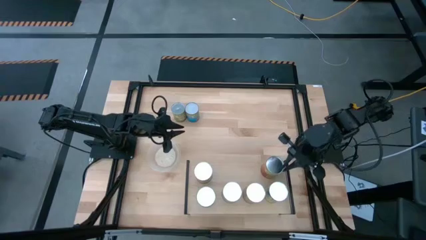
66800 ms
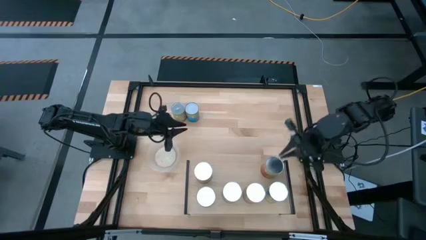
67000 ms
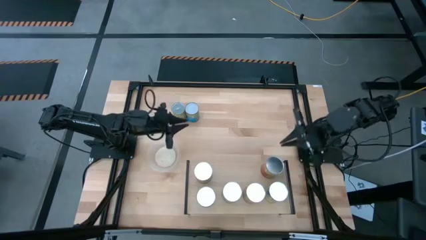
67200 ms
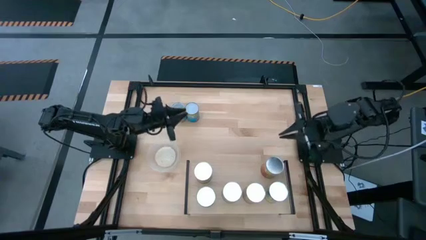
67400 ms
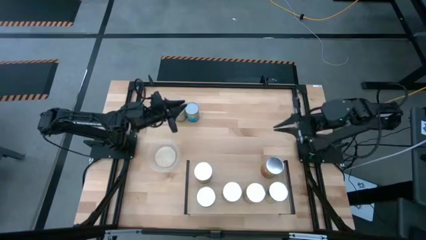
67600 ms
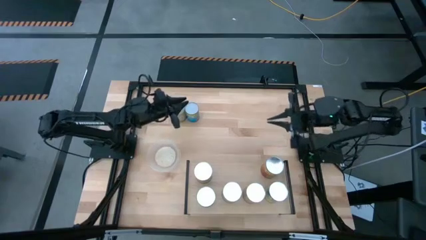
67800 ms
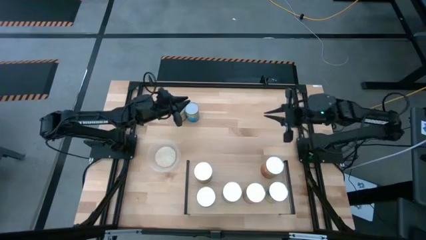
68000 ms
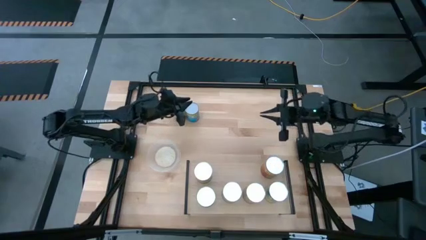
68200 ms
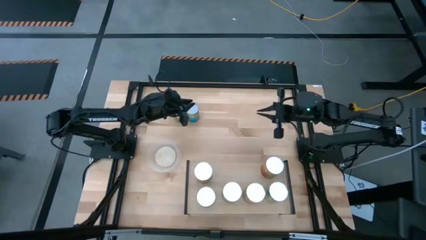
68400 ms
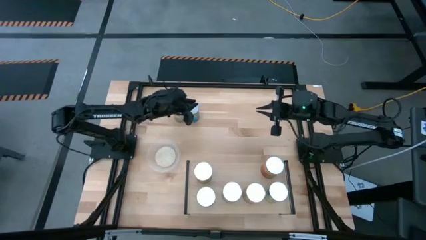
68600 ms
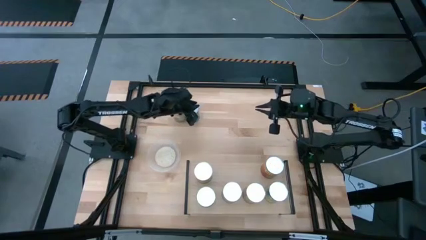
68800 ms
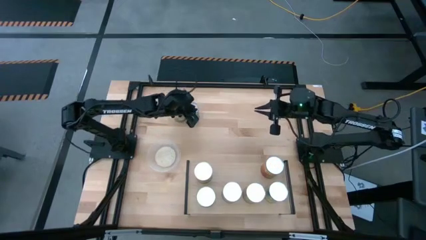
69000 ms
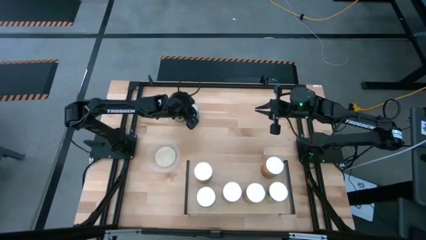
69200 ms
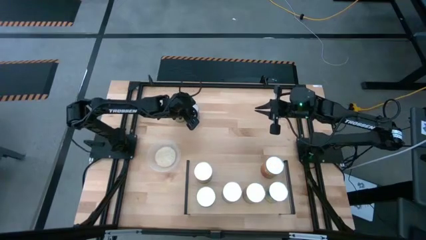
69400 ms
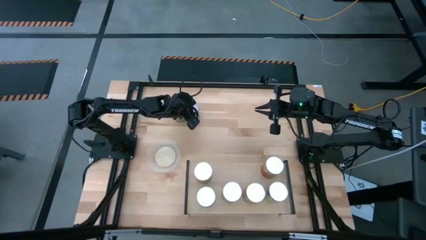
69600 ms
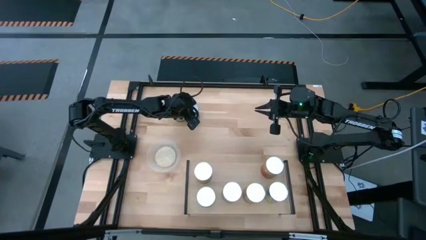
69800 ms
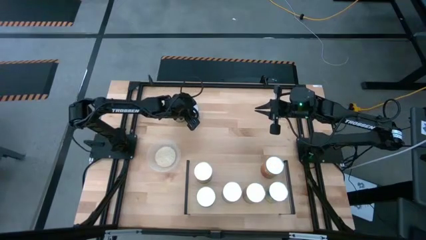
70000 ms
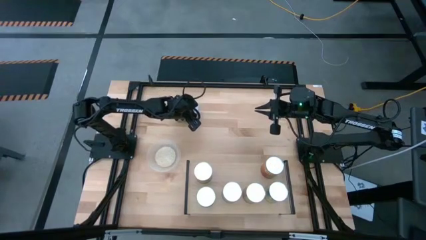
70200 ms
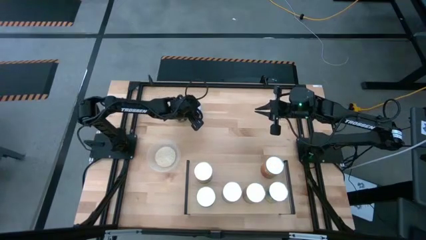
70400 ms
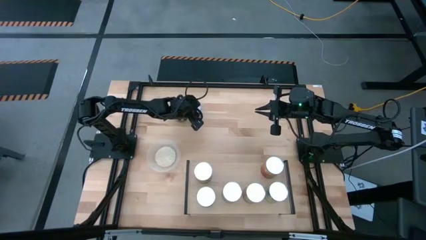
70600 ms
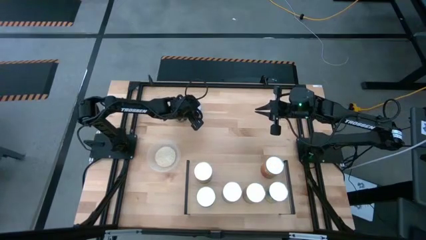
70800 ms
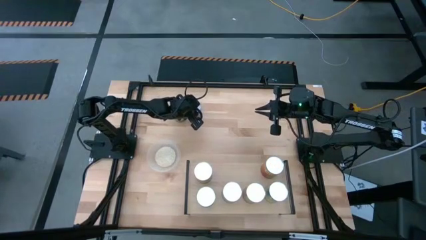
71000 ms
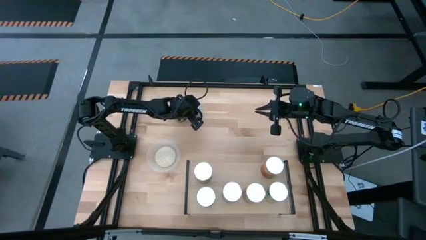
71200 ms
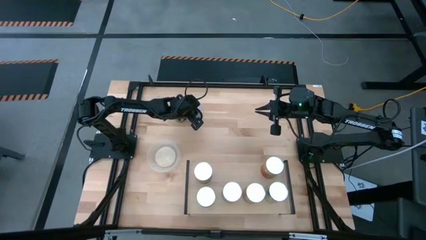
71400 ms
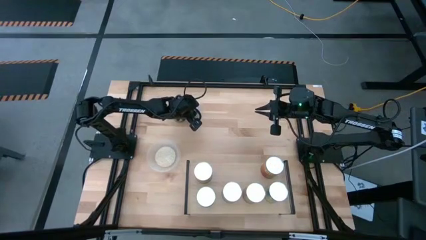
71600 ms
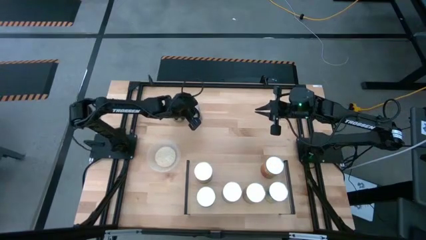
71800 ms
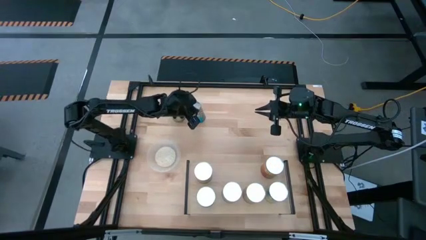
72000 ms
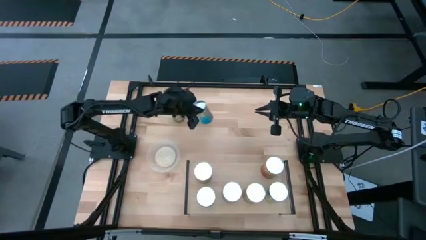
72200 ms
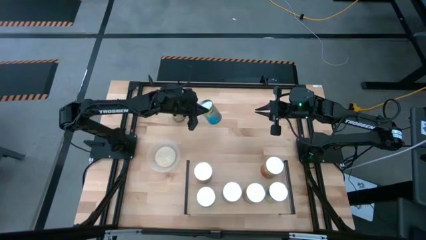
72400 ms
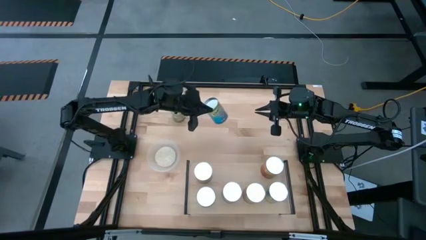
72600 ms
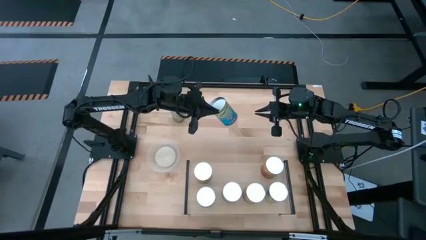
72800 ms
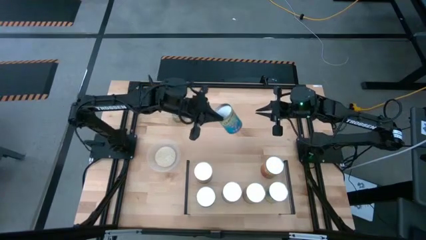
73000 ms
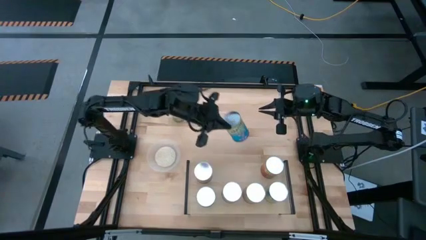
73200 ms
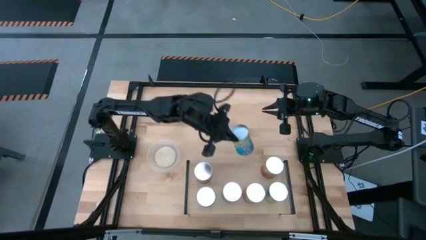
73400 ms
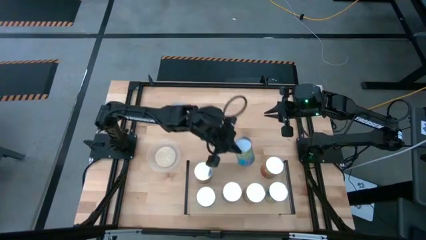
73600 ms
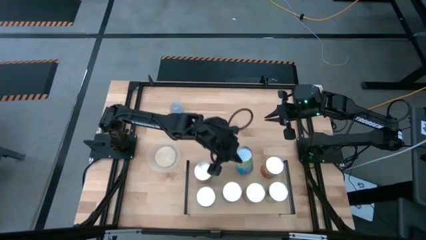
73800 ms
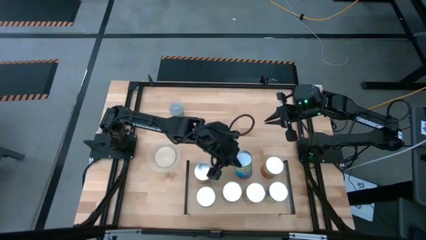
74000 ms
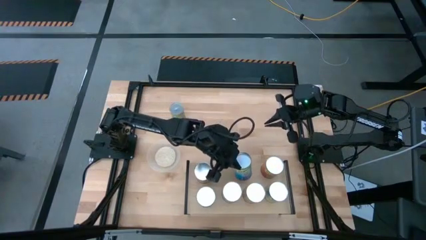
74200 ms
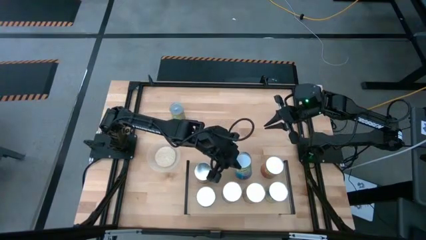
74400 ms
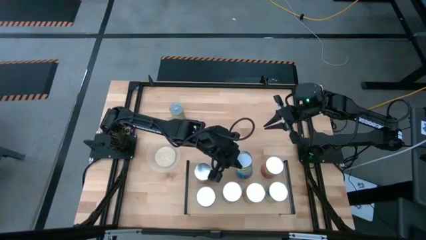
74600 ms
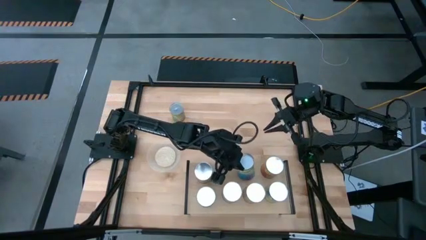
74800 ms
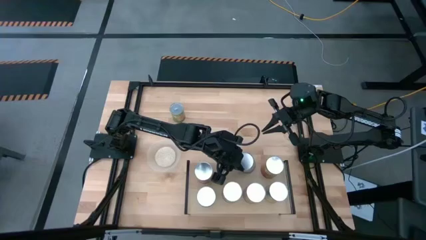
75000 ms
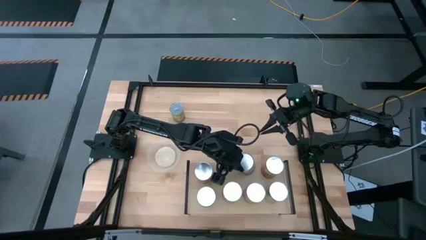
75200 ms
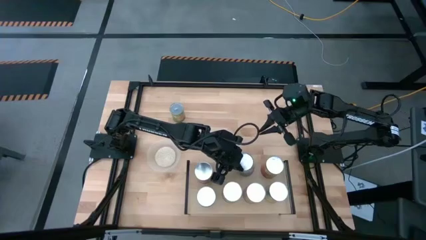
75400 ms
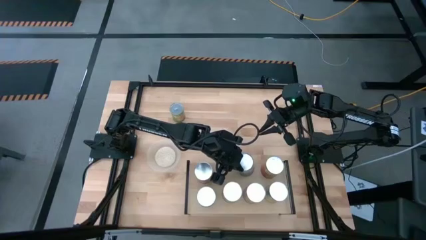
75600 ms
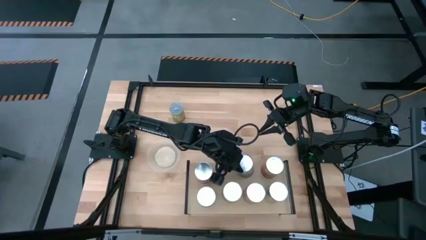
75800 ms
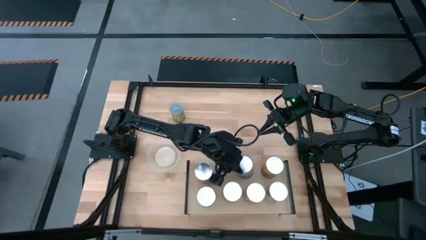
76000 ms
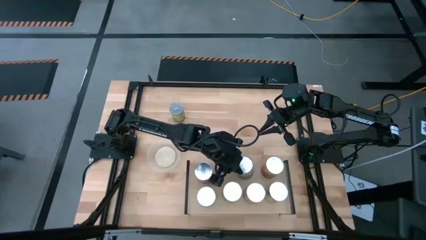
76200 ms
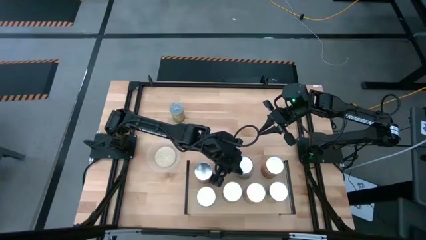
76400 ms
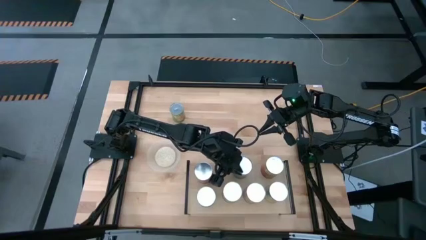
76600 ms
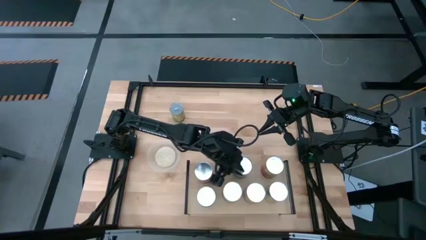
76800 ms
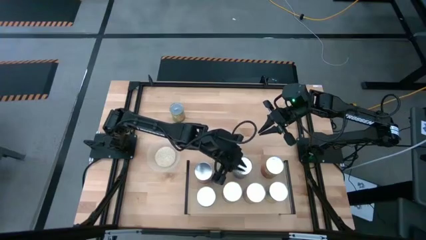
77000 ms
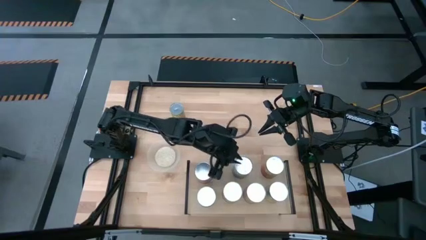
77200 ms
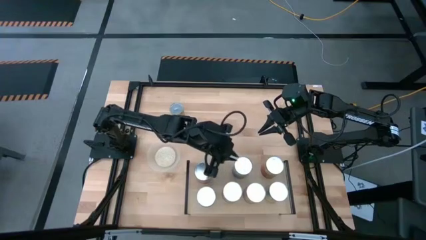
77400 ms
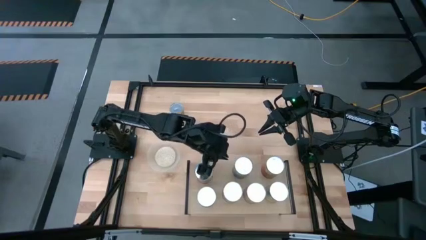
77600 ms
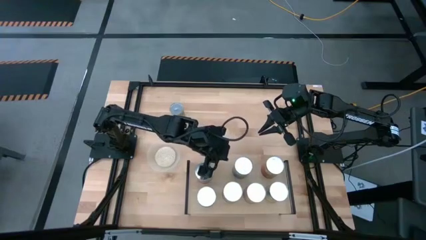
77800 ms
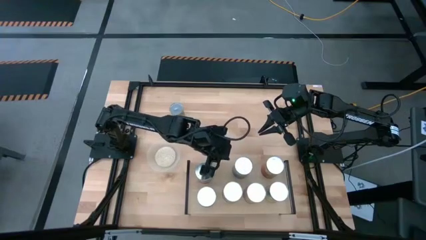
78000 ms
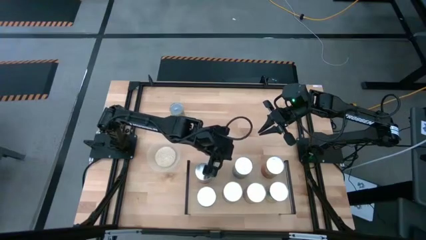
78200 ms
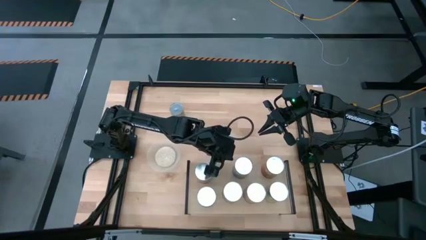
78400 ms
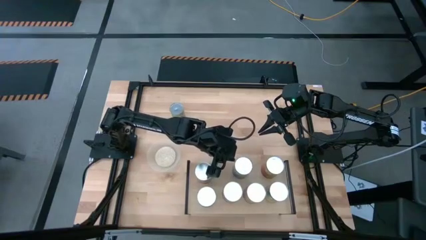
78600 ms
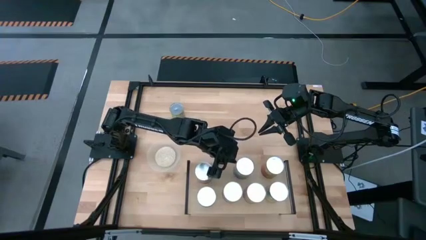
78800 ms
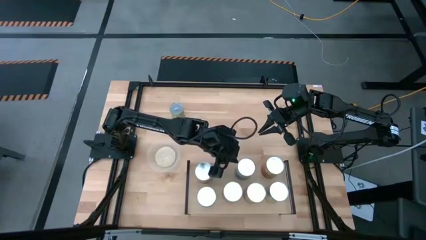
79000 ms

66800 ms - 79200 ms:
Task: Pick and place cans onto a shelf
Put the canned cherries on the shelf

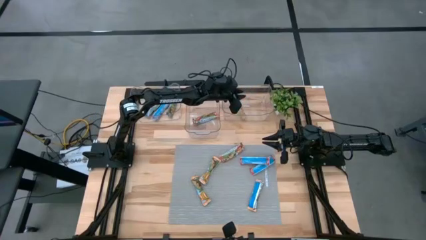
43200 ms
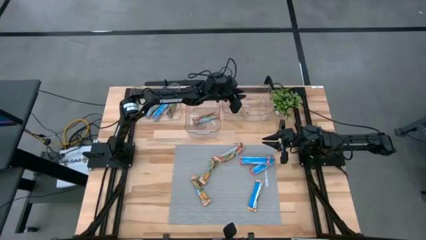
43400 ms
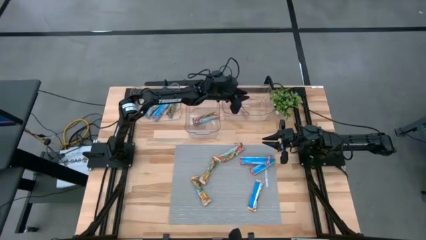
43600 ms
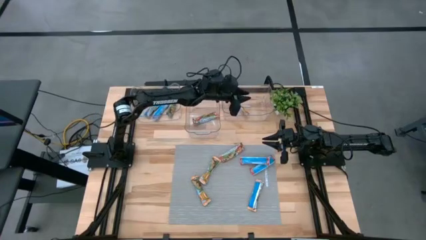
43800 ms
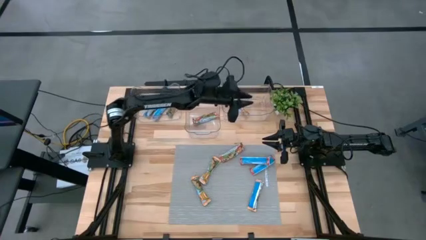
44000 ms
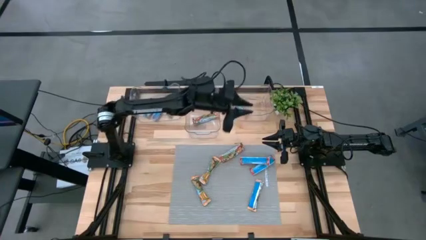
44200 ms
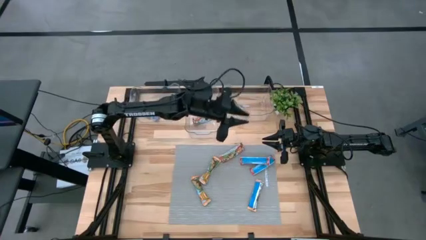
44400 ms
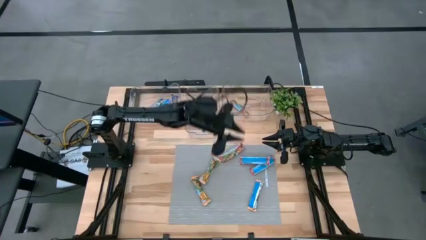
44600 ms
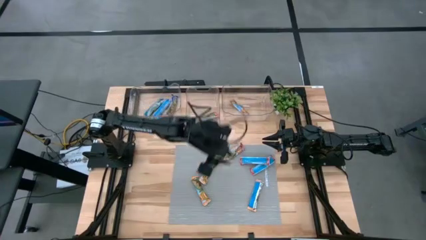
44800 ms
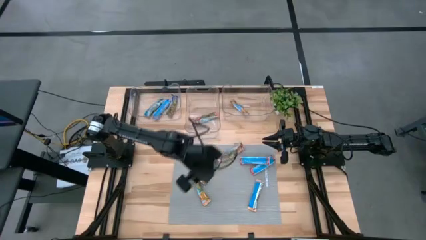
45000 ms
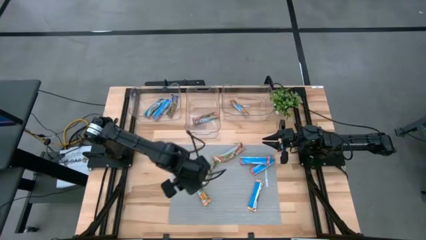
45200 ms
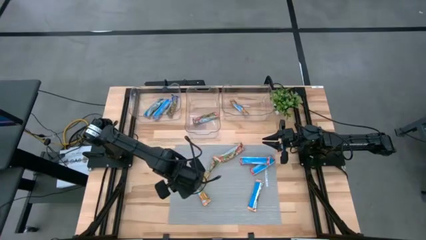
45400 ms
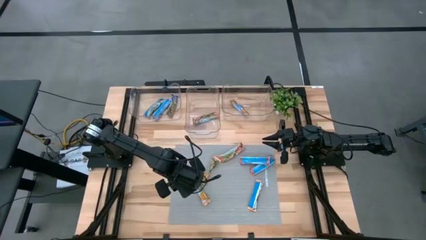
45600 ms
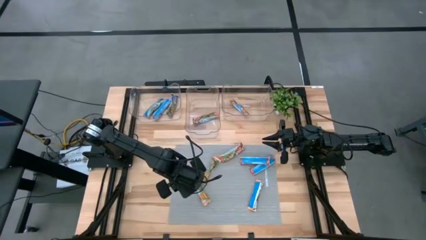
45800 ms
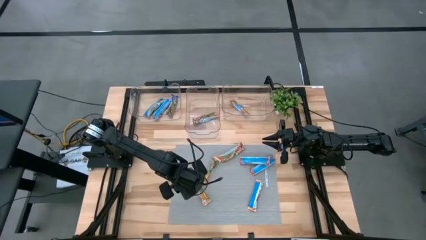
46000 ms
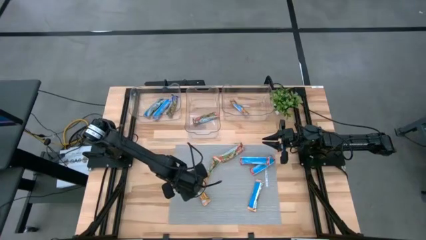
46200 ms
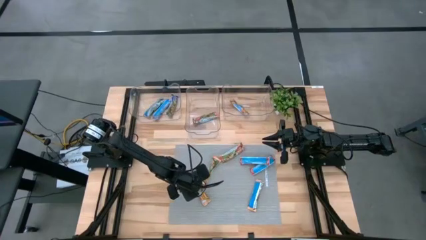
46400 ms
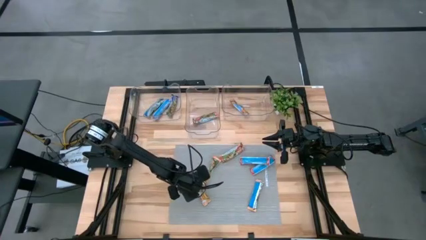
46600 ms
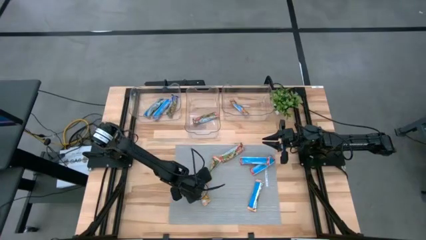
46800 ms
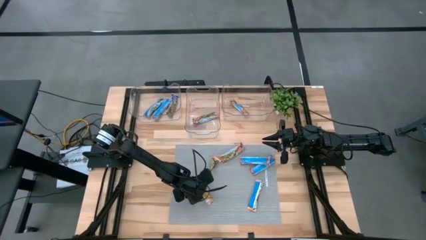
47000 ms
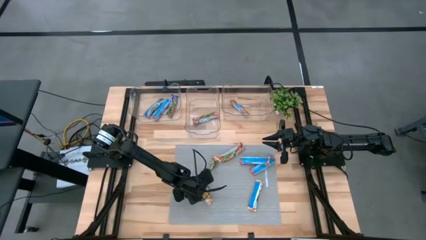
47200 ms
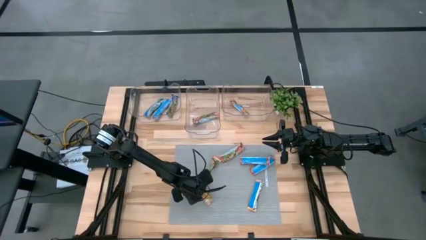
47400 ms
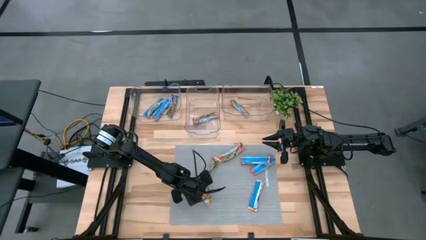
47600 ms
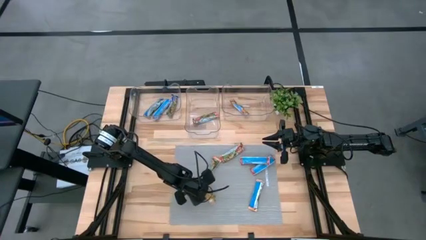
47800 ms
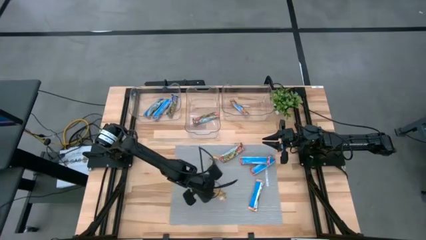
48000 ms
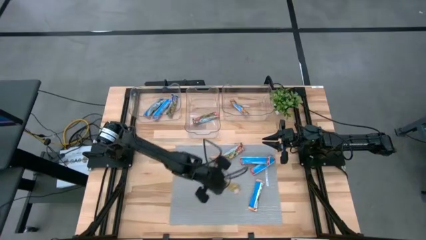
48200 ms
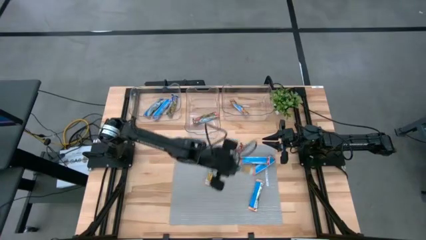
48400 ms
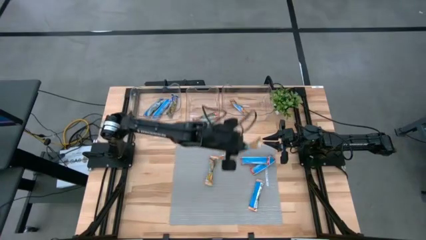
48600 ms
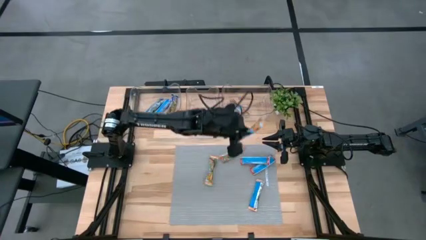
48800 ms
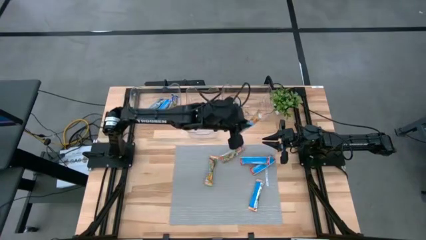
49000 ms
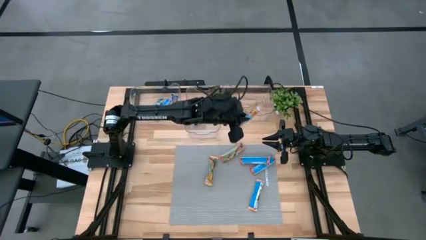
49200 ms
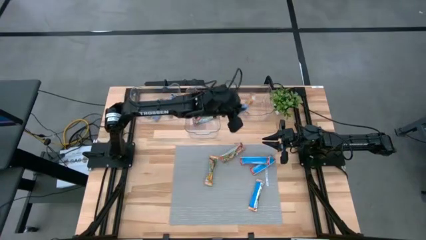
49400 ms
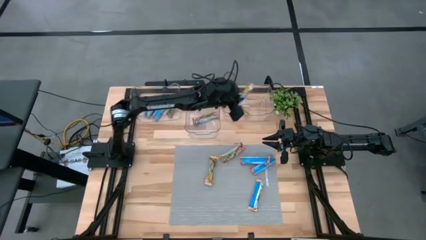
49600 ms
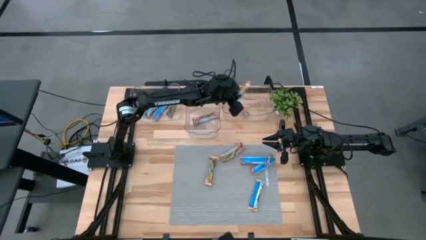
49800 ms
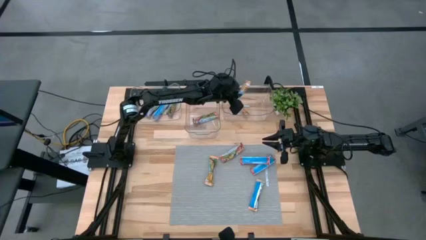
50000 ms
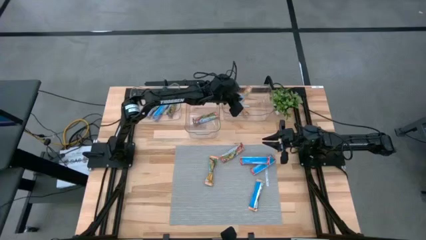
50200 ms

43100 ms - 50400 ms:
Task: Pick and place Granola Bars by type
Put the yellow granola bar into the right transparent bin
